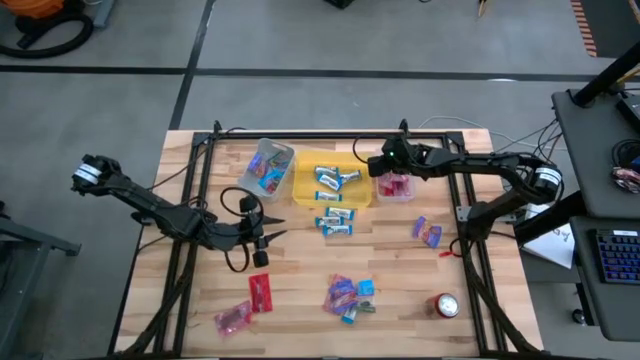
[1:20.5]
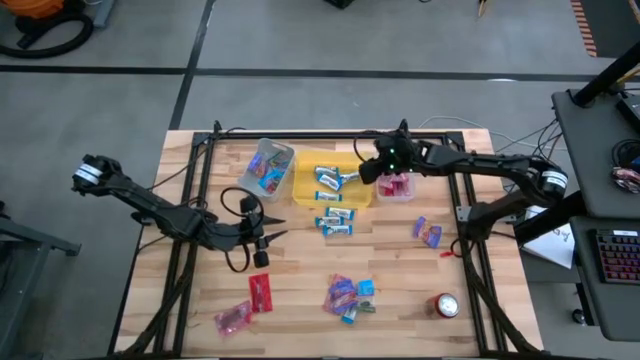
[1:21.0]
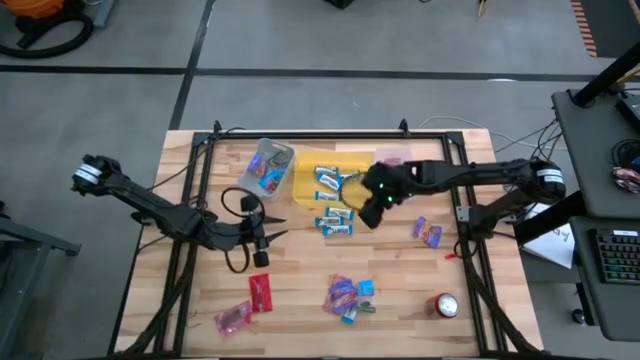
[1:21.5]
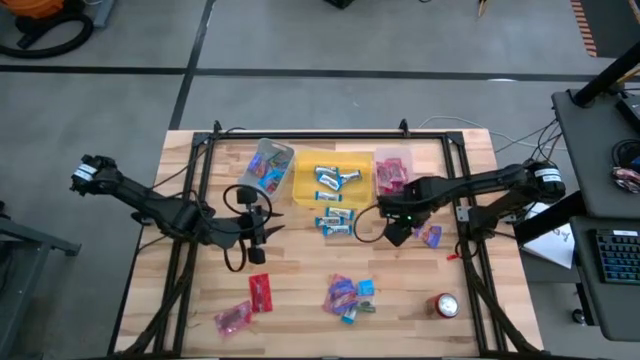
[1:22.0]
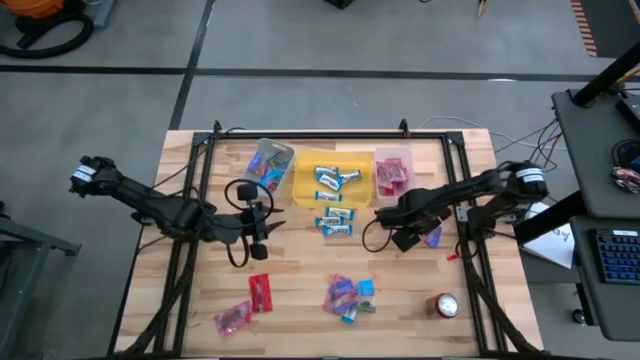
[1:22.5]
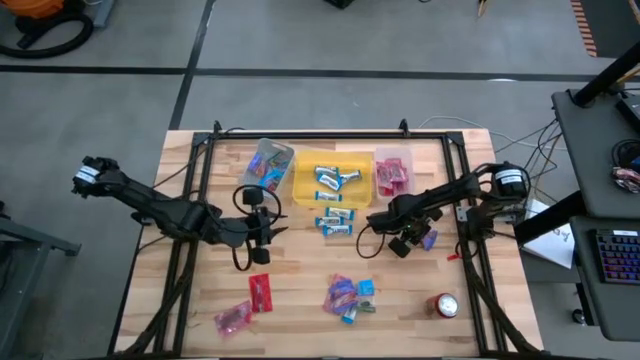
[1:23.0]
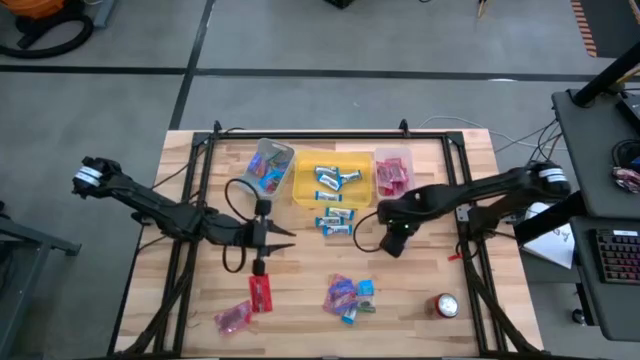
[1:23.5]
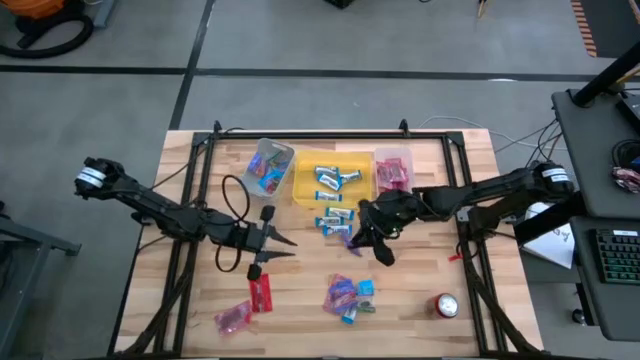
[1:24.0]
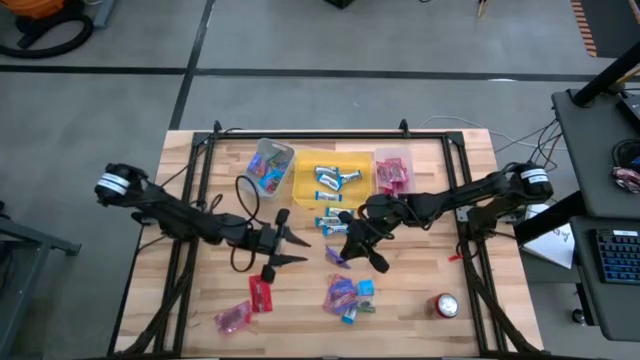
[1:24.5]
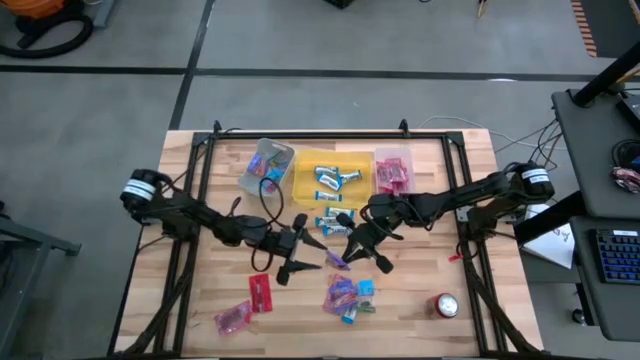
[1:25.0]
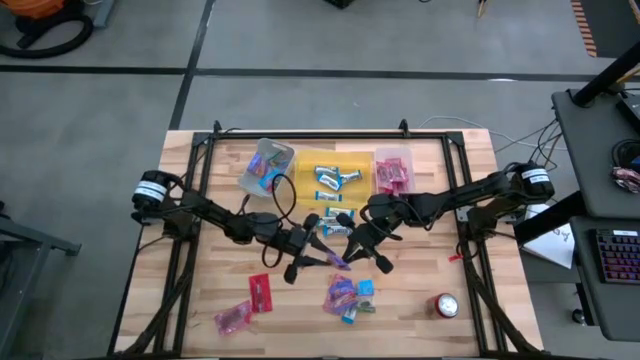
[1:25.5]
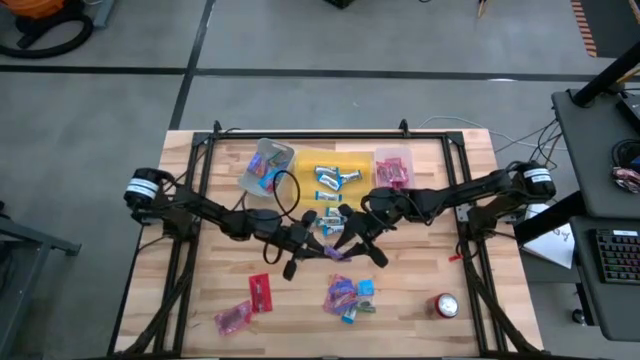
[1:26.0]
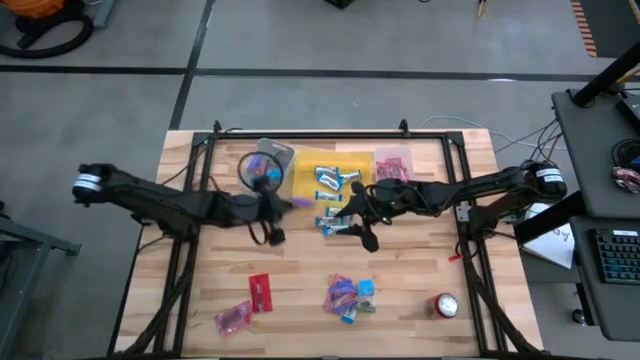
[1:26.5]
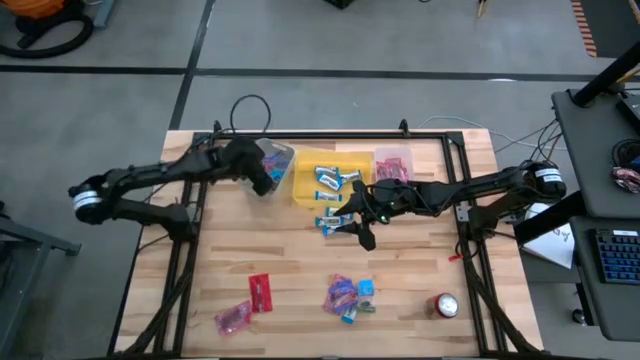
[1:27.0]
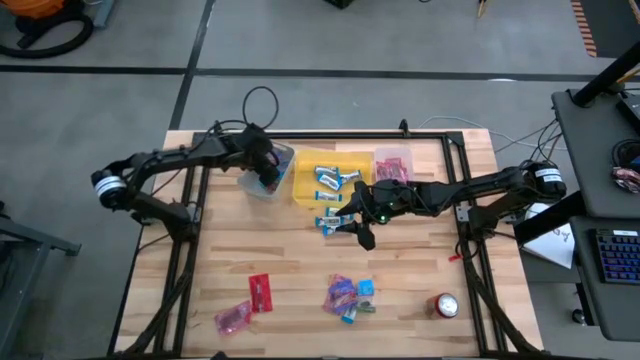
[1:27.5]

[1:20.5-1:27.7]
Task: Sort candy
Put the blue candy into the gray bin

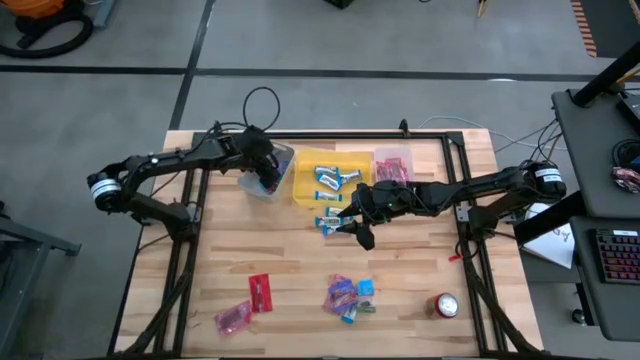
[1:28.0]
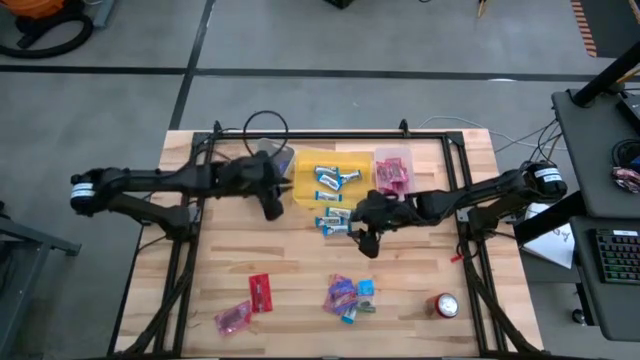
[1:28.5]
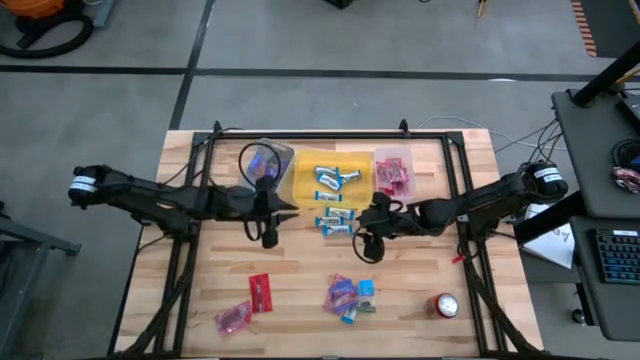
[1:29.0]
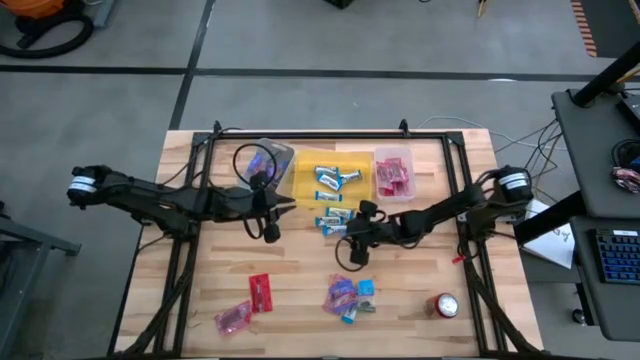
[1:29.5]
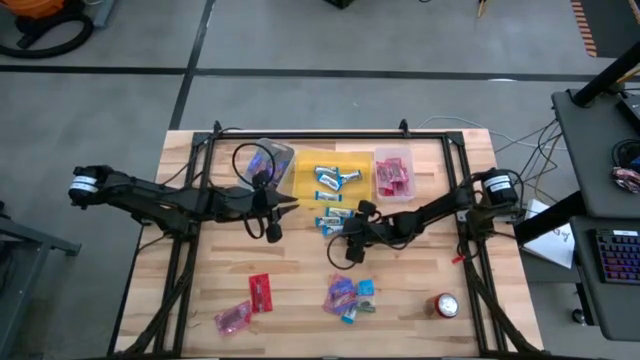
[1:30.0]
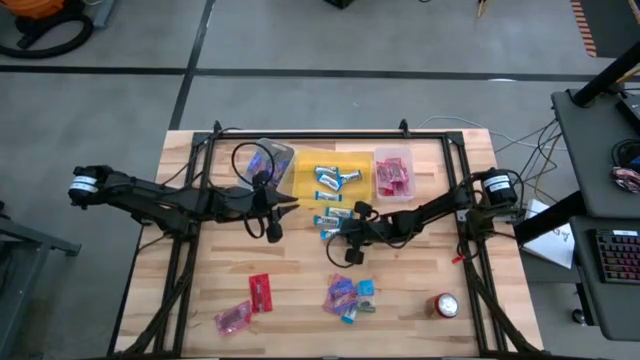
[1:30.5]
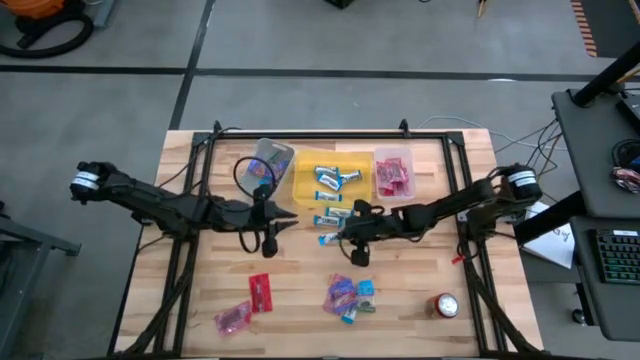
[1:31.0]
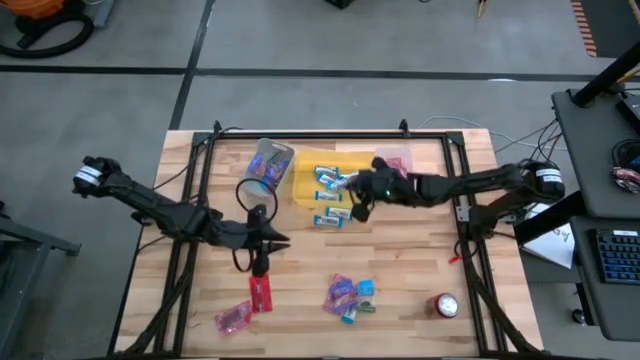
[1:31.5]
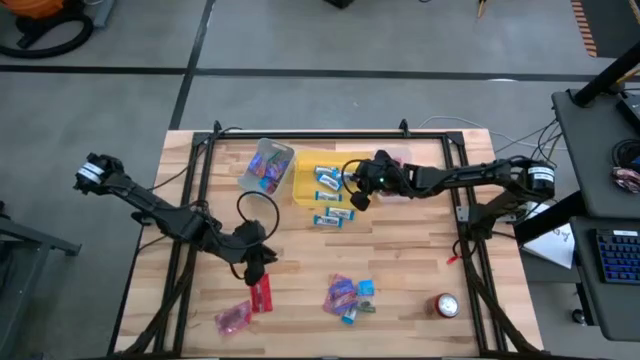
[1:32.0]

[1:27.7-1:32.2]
Put the white chocolate into the yellow bin

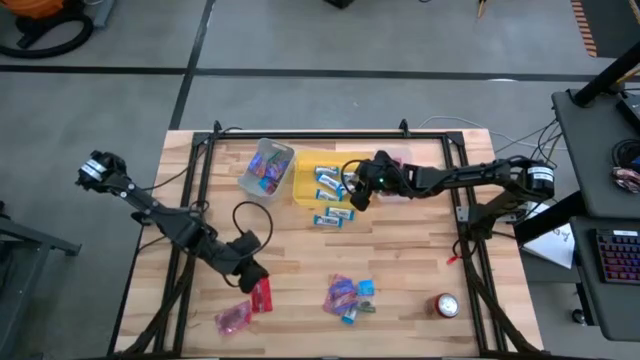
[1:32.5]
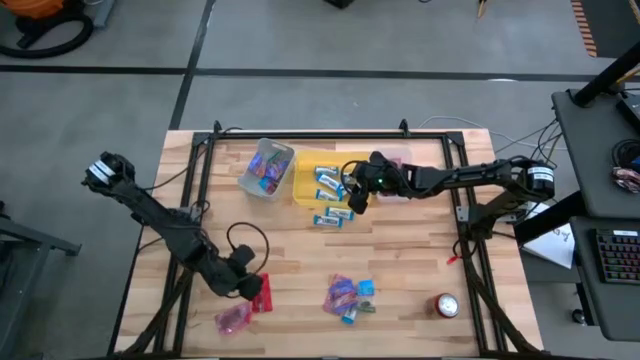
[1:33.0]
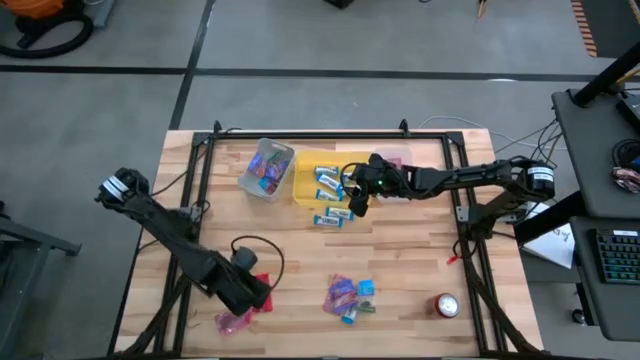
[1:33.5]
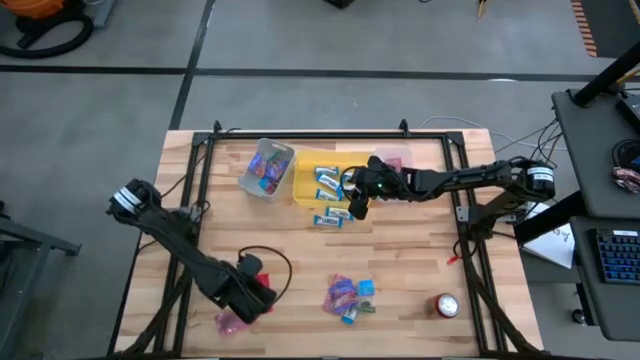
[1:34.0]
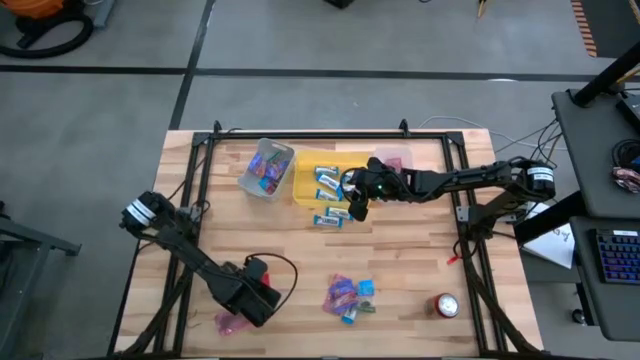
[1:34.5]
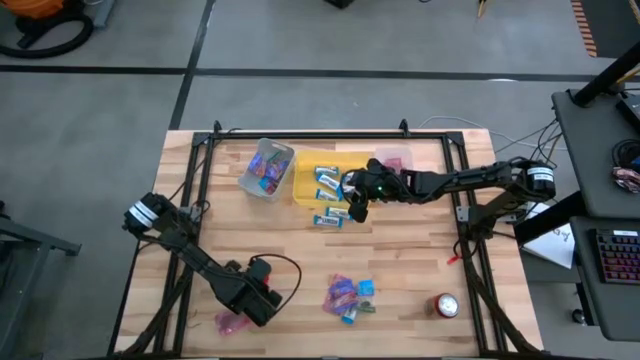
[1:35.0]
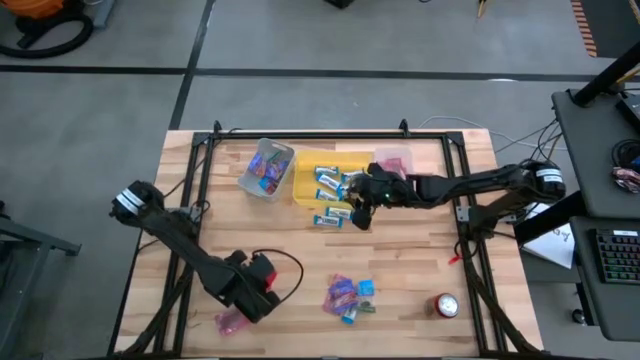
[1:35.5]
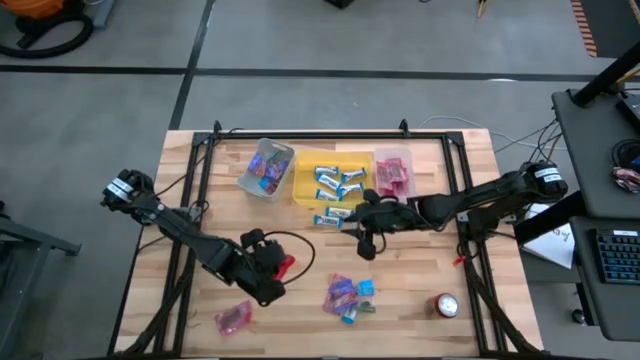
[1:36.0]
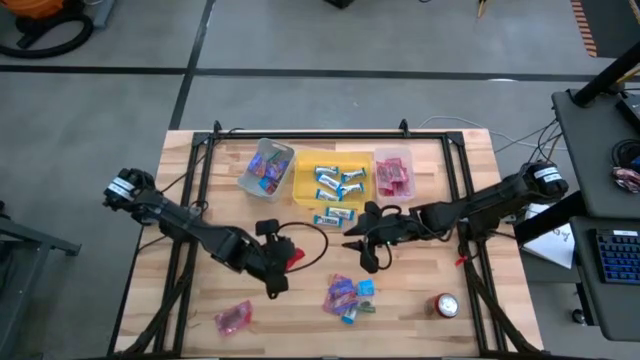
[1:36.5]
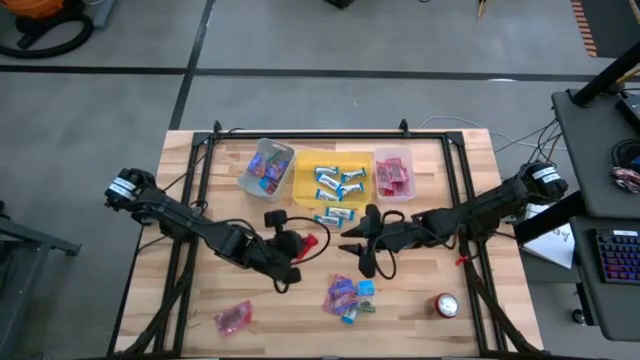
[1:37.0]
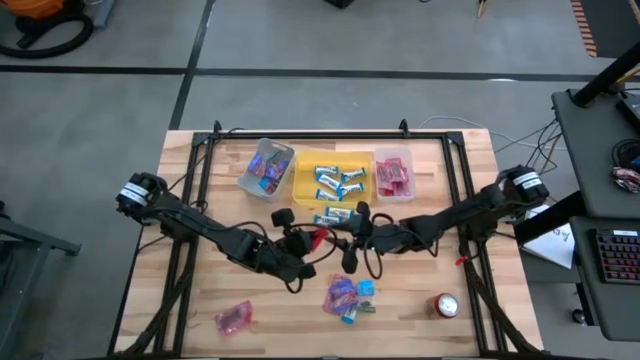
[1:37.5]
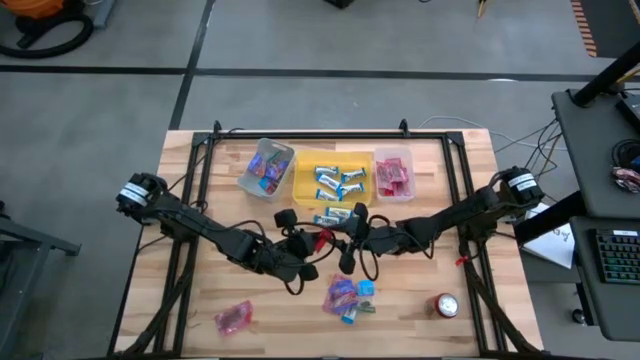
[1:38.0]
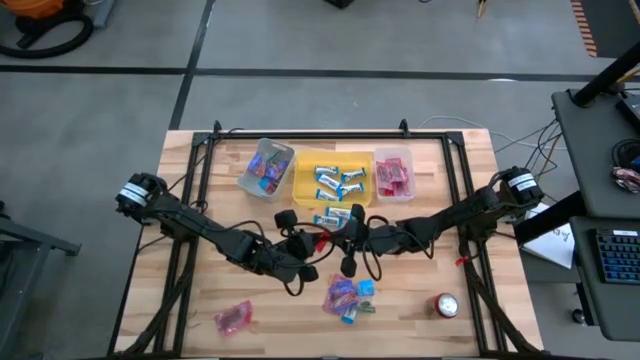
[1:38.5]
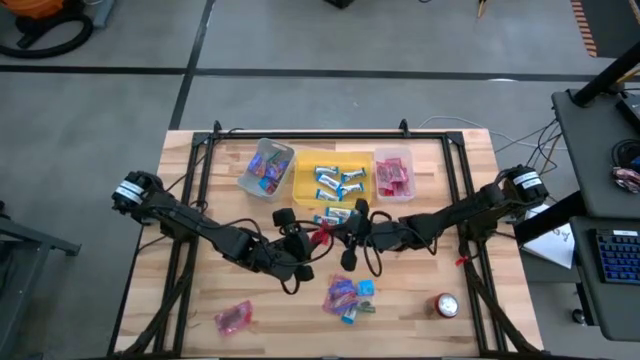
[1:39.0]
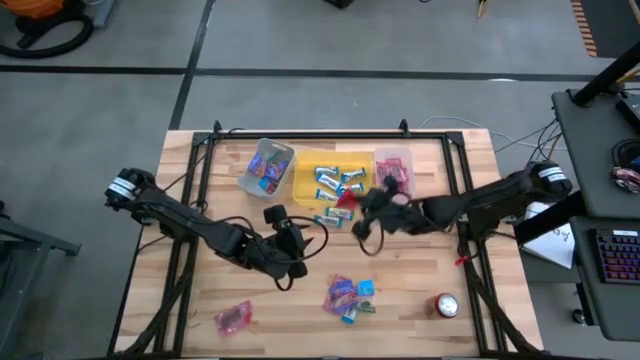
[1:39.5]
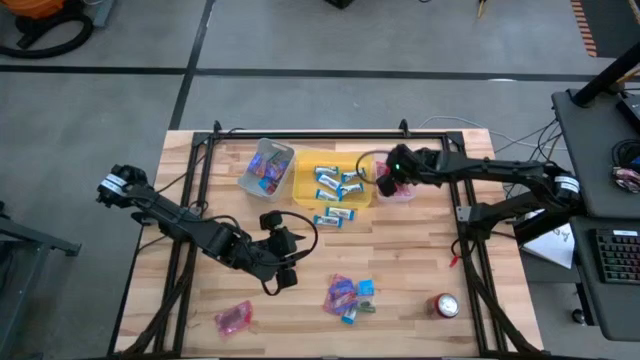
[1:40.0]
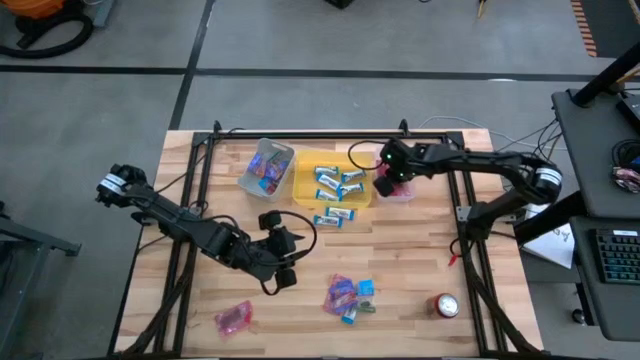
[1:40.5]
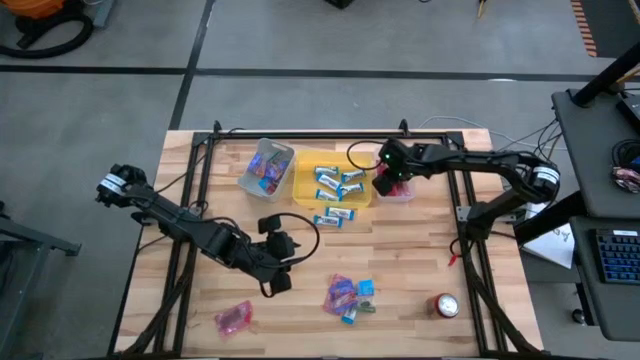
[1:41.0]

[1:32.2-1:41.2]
Put the red candy into the transparent bin
